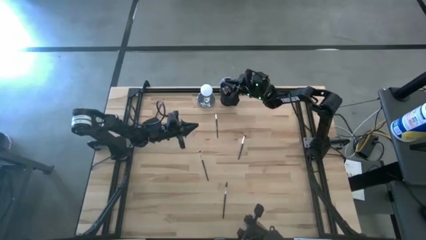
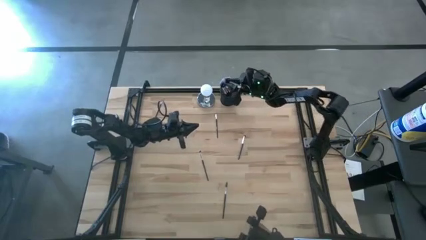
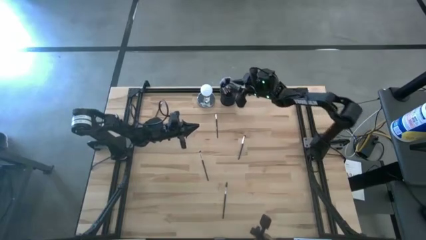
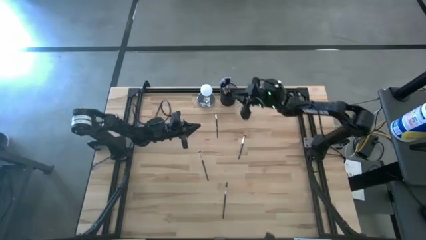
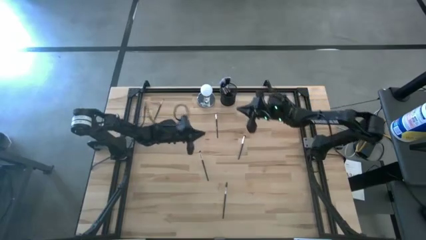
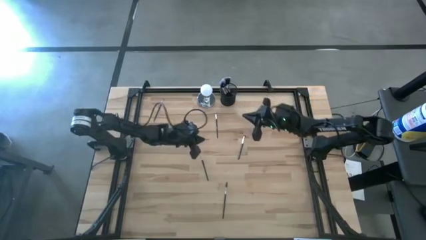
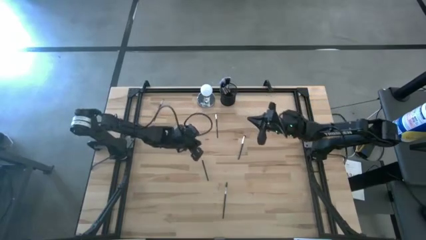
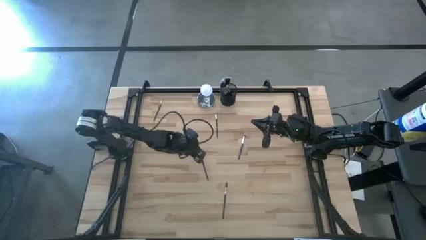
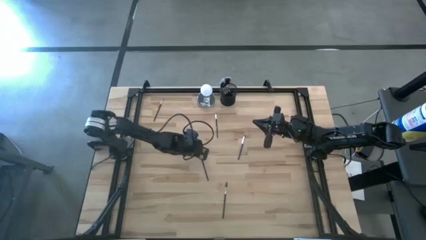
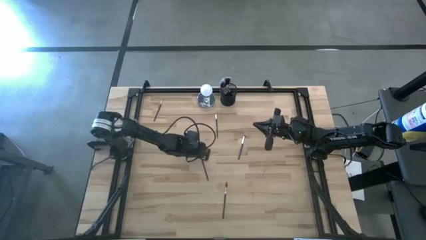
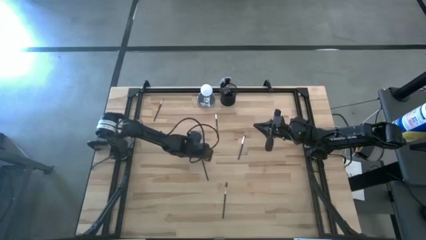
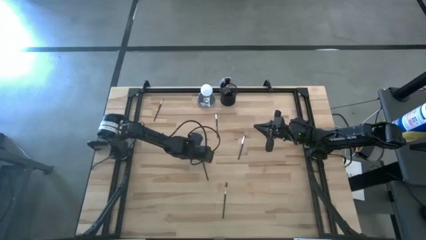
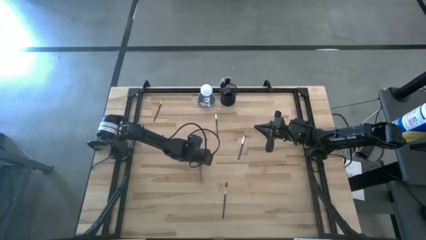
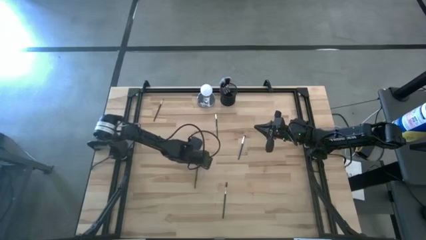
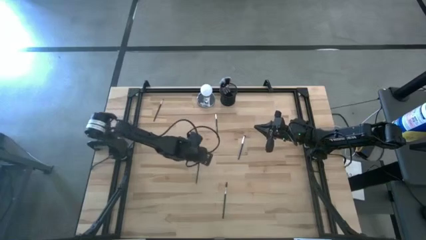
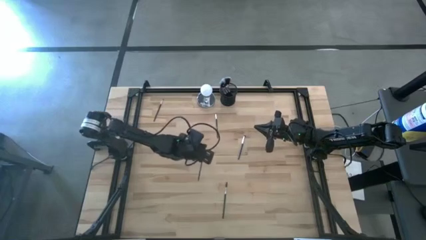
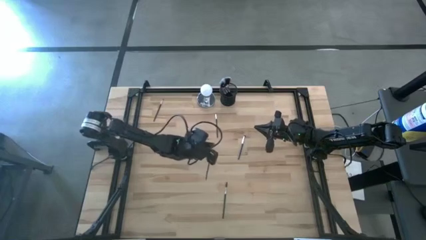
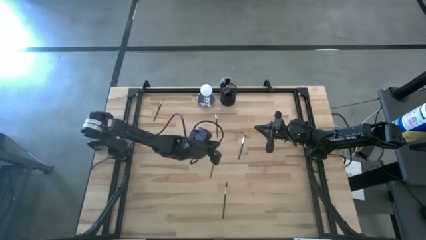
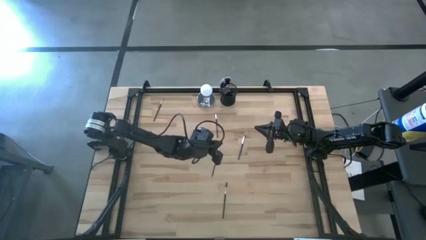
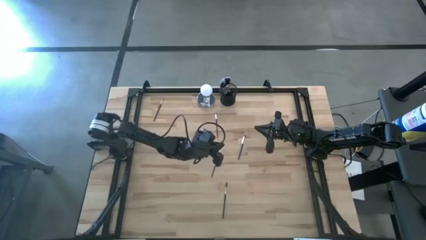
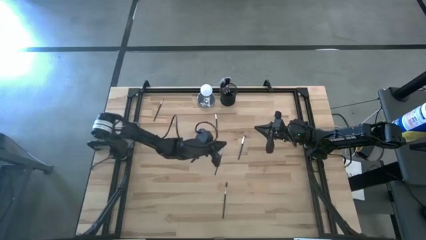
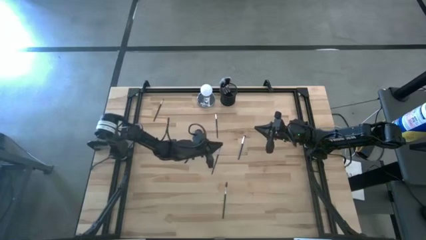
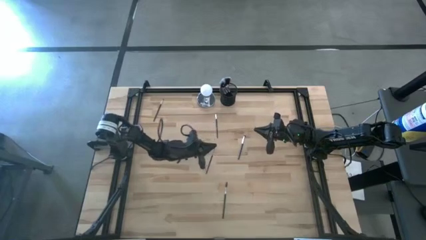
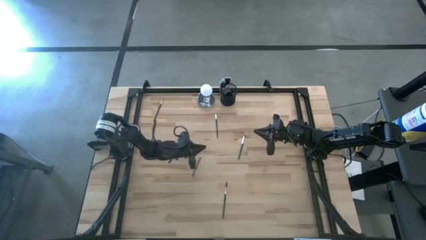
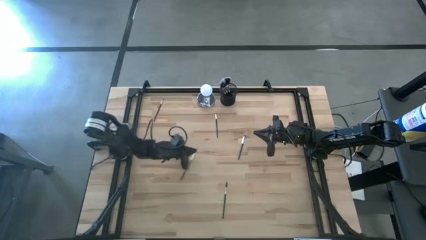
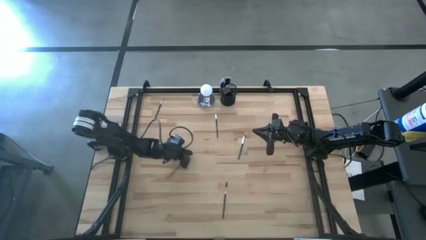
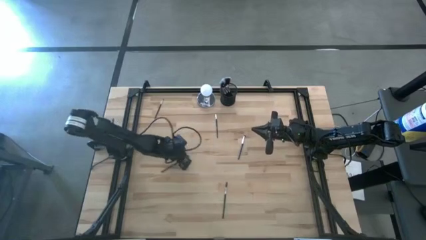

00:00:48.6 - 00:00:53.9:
Task: Pick & Place Makeup Supplies
Put the makeup brush into the black makeup holder

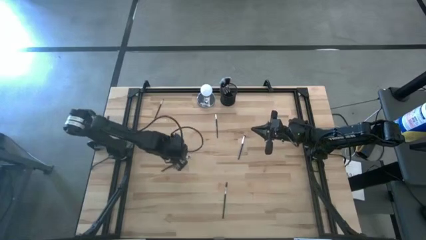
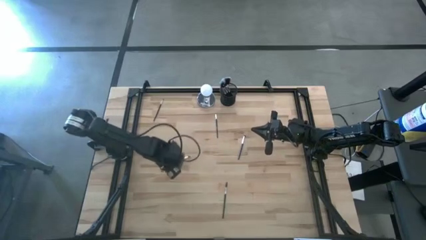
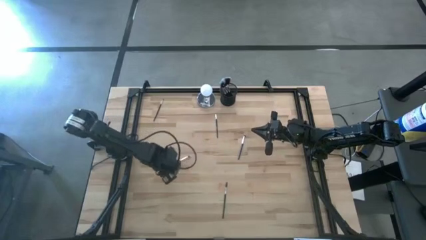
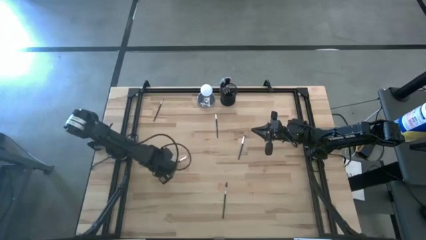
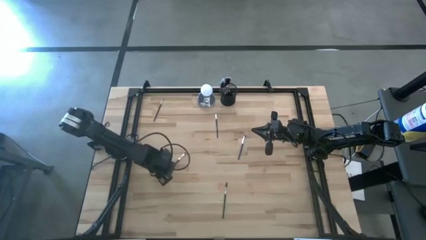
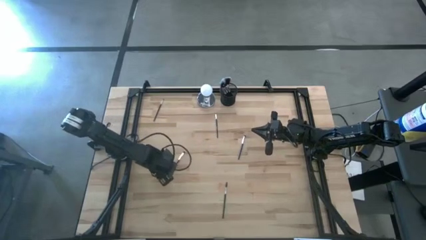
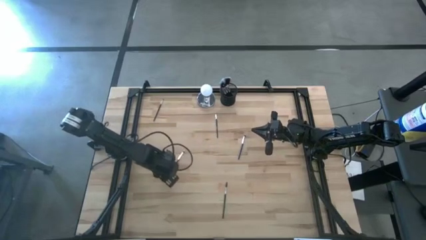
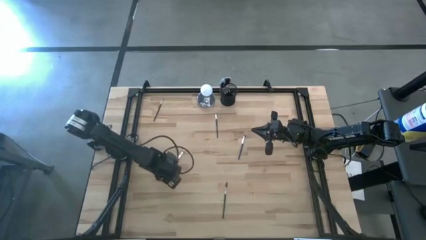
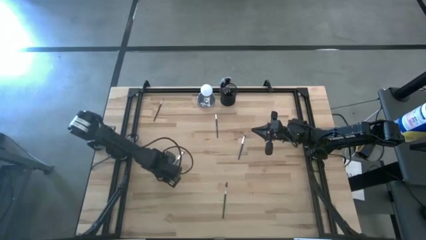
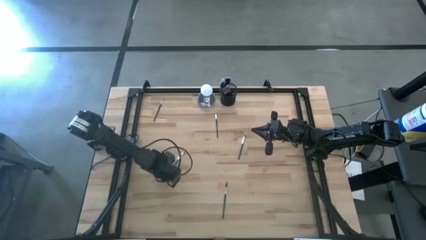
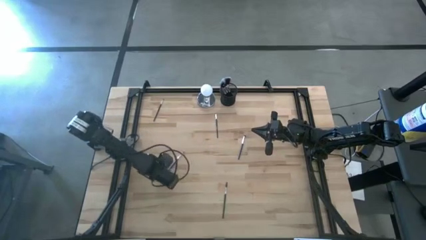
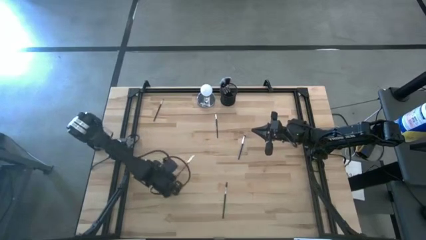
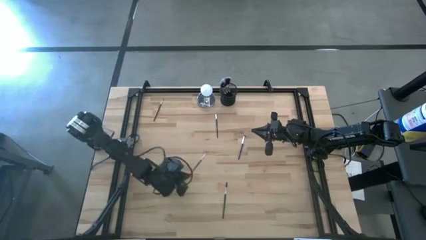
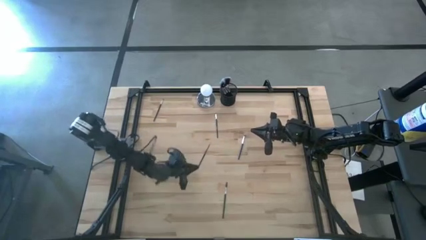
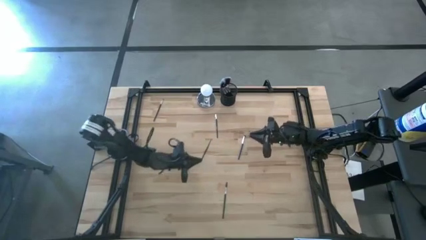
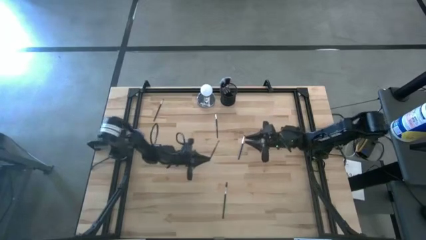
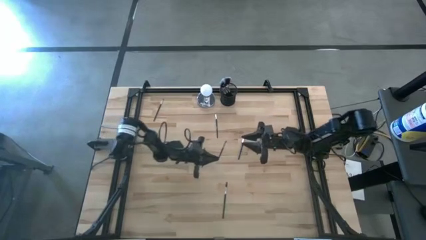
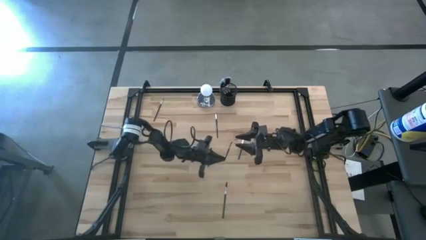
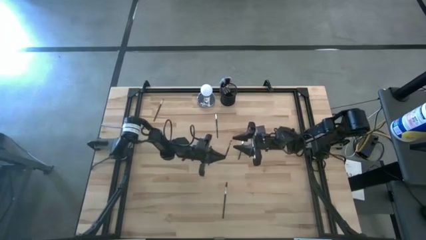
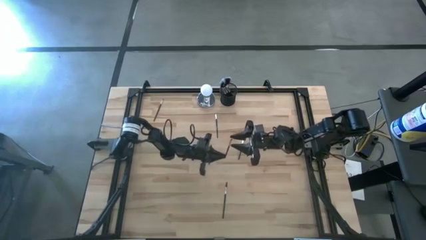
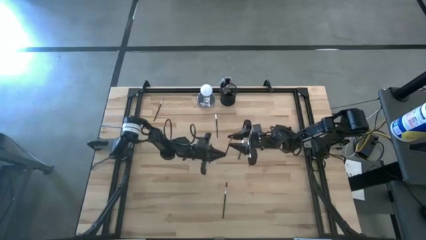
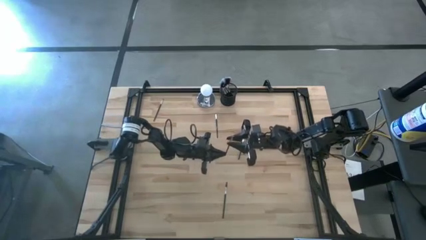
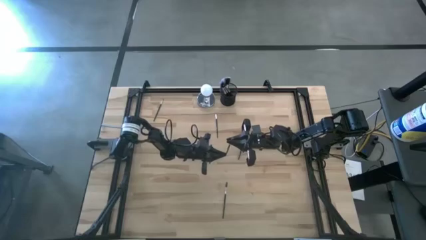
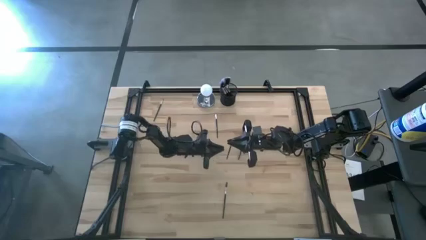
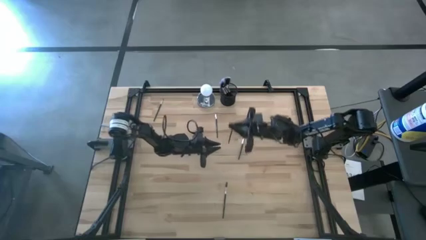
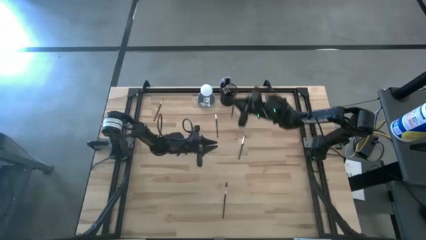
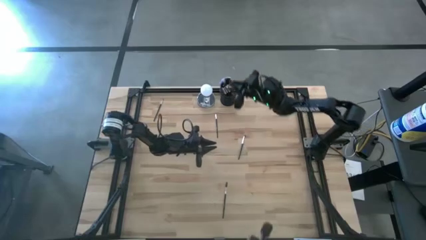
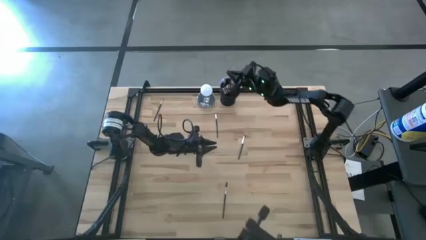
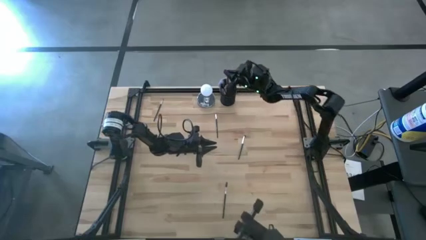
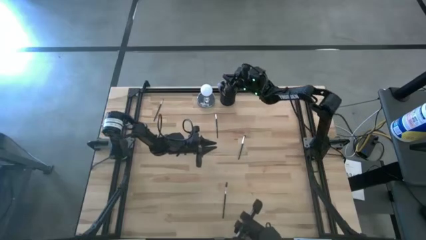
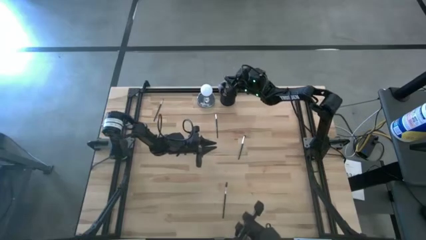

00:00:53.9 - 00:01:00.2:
Put the makeup brush into the black makeup holder

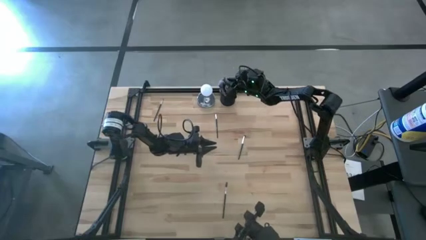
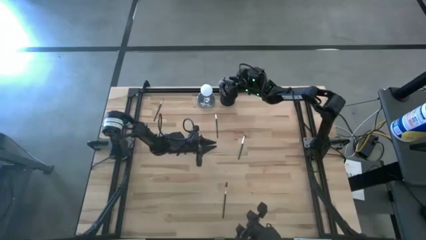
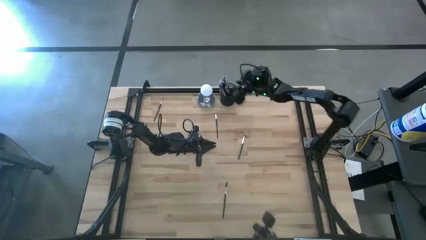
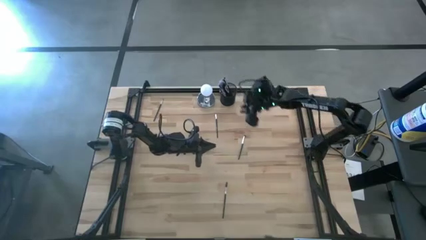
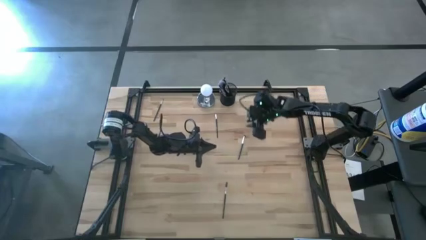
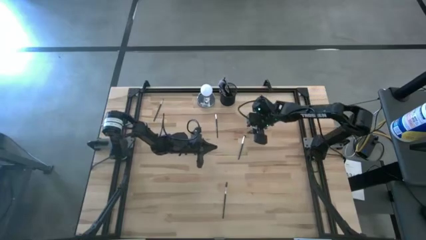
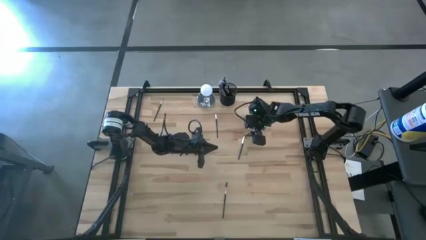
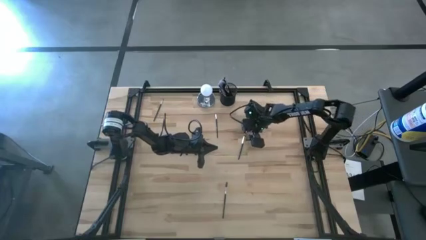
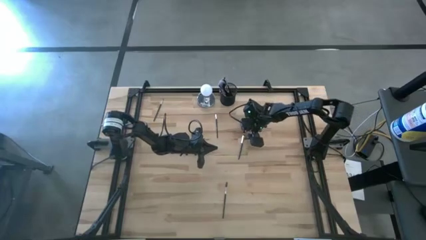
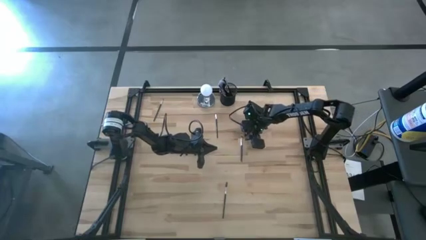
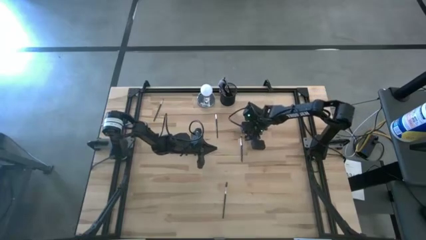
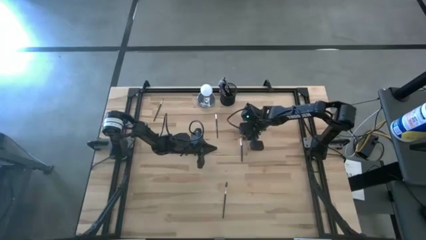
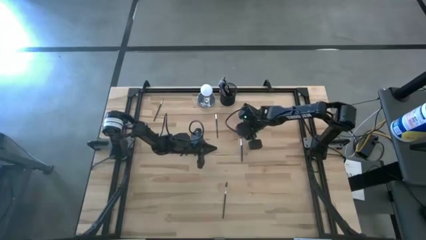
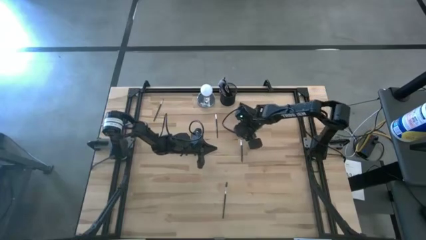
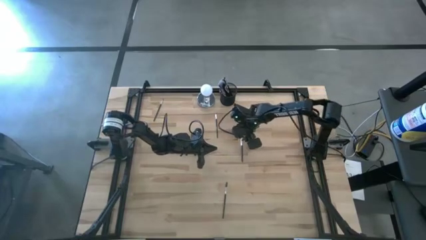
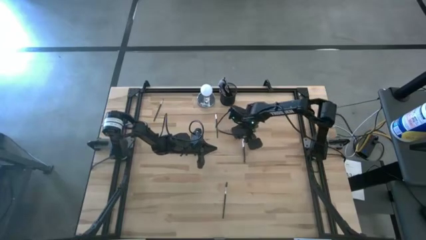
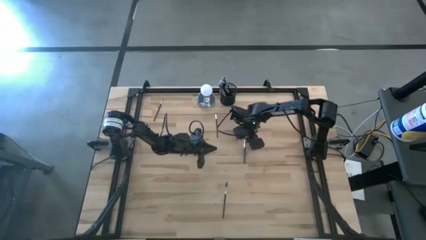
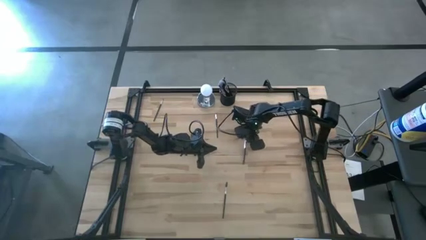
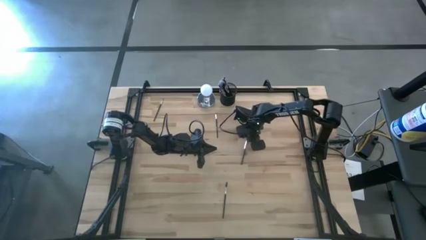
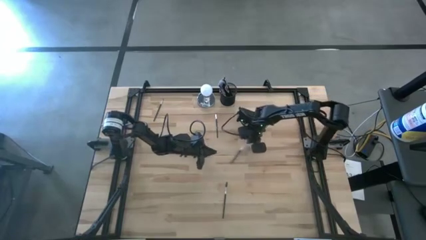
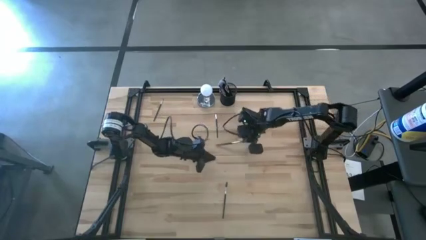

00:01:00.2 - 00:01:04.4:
Put the makeup brush into the black makeup holder

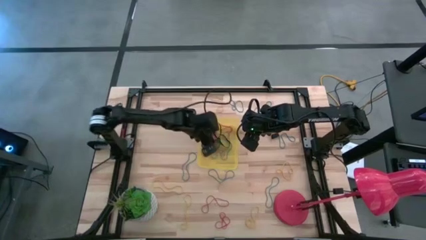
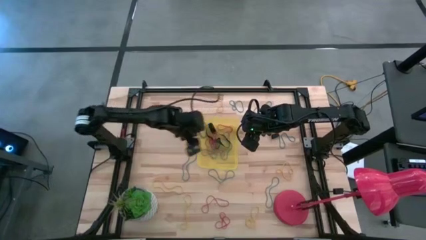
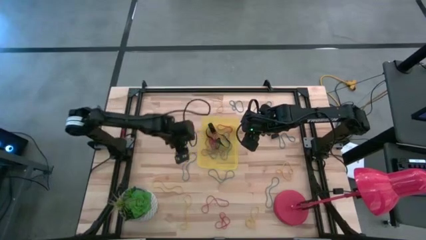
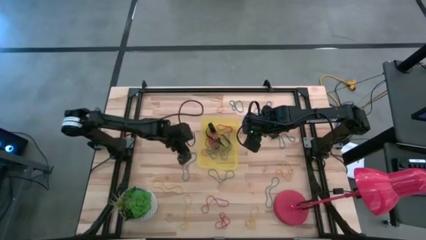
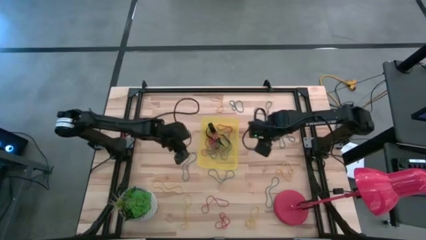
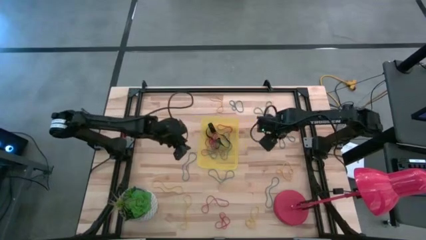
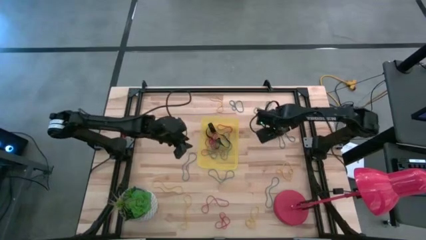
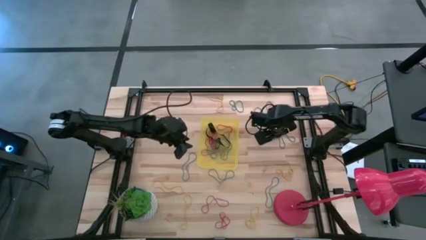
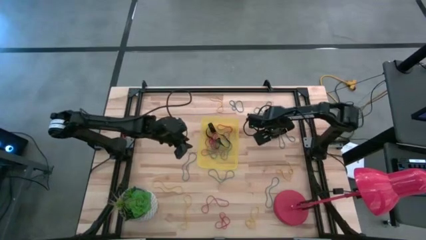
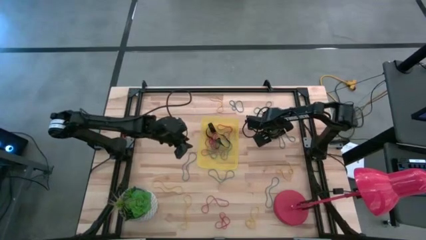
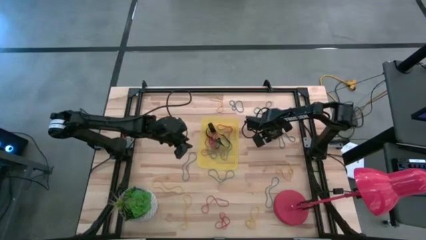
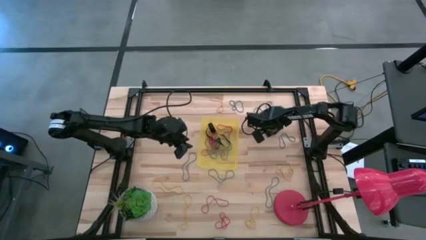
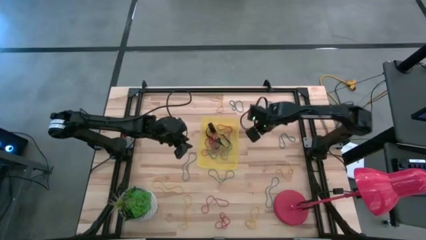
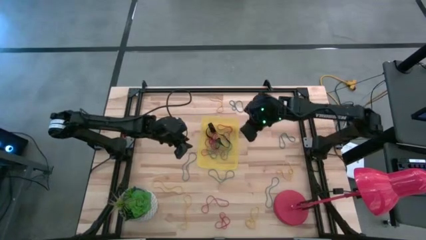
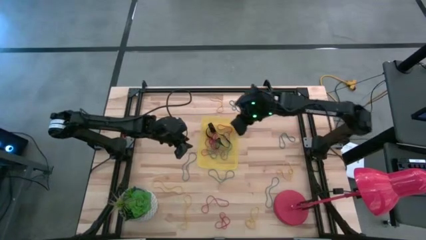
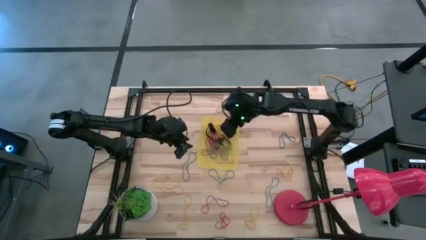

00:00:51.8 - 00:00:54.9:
Task: Pick and place rubber bands into bin
Put the black rubber band into the yellow bin
